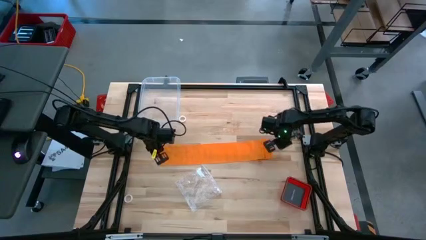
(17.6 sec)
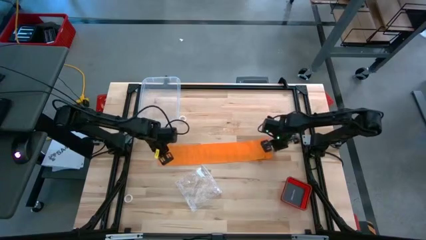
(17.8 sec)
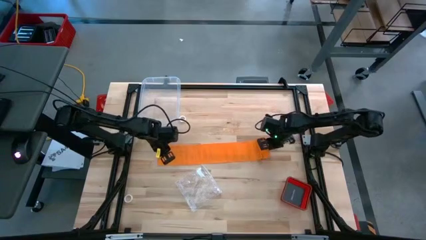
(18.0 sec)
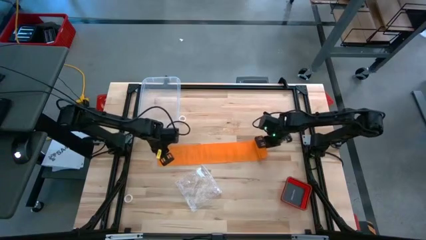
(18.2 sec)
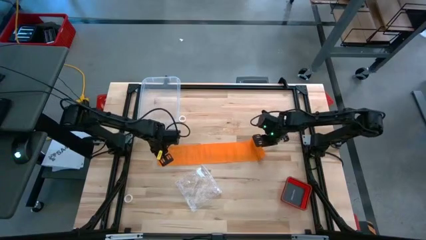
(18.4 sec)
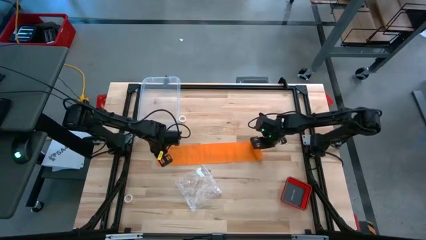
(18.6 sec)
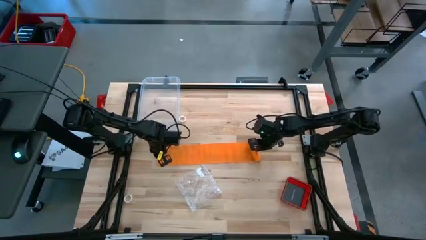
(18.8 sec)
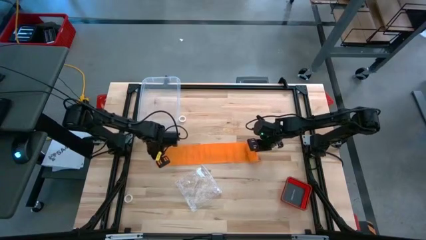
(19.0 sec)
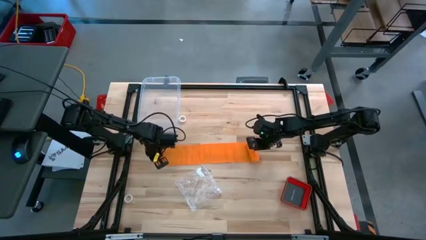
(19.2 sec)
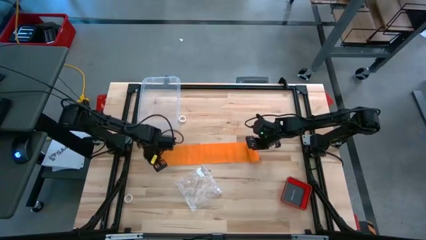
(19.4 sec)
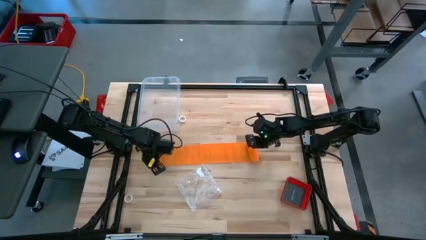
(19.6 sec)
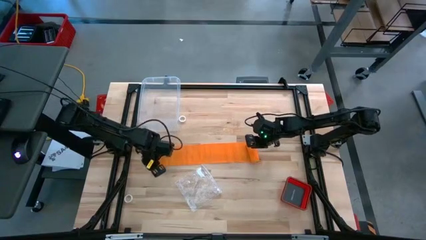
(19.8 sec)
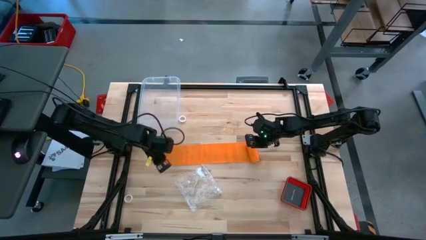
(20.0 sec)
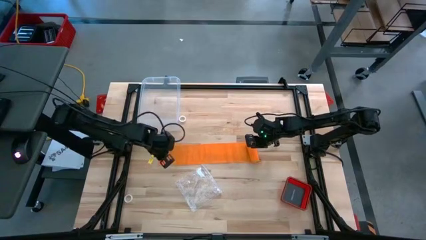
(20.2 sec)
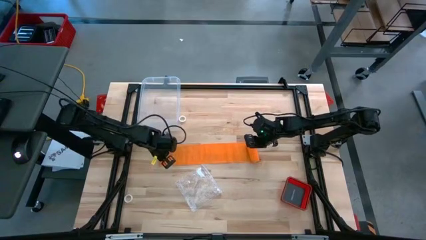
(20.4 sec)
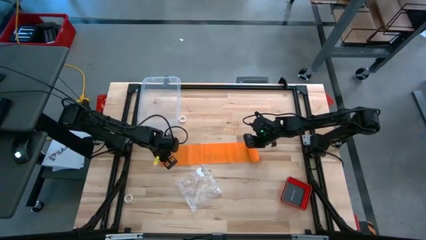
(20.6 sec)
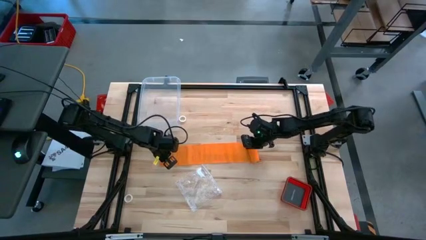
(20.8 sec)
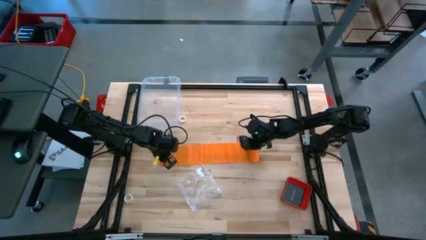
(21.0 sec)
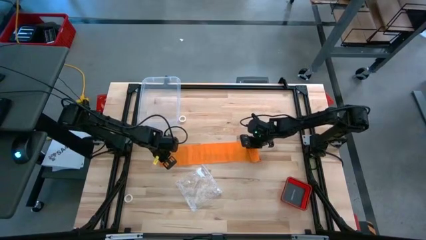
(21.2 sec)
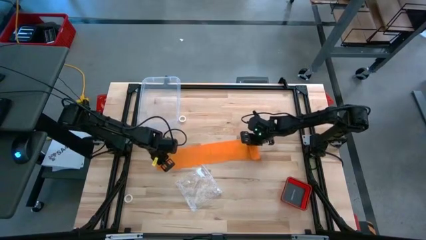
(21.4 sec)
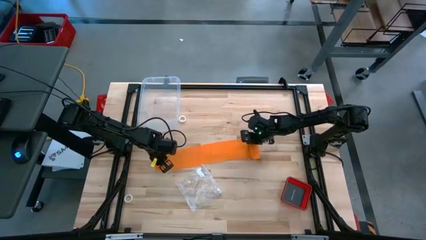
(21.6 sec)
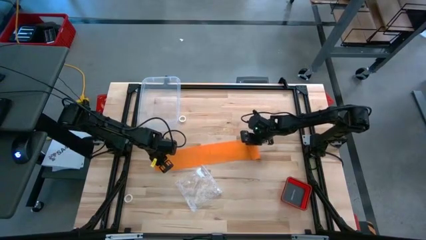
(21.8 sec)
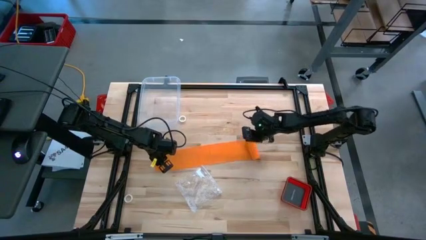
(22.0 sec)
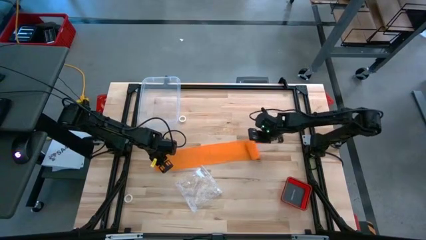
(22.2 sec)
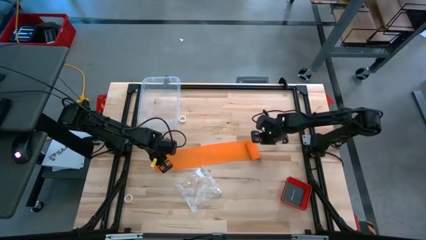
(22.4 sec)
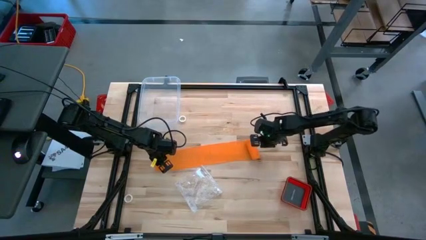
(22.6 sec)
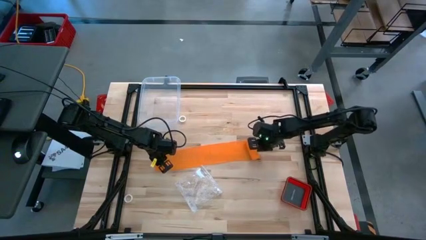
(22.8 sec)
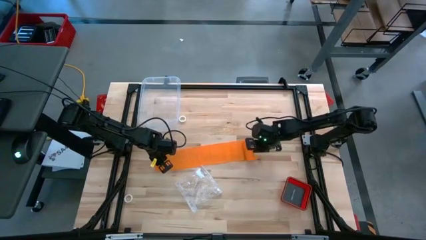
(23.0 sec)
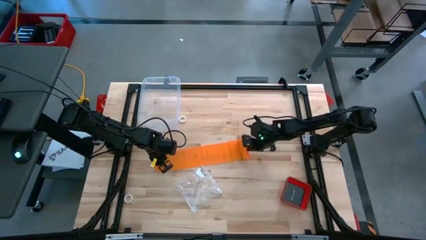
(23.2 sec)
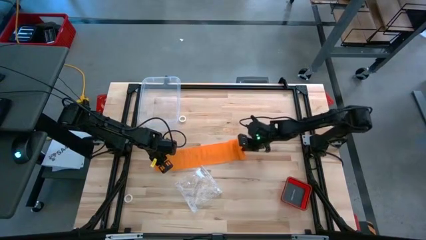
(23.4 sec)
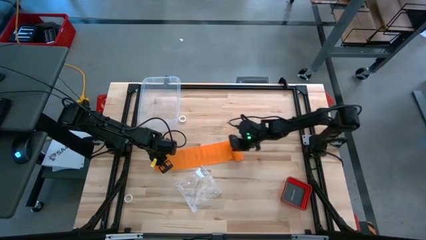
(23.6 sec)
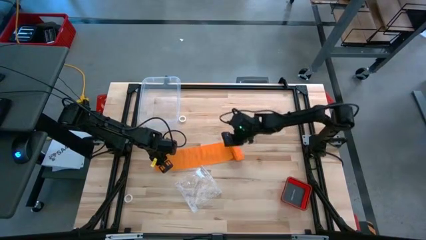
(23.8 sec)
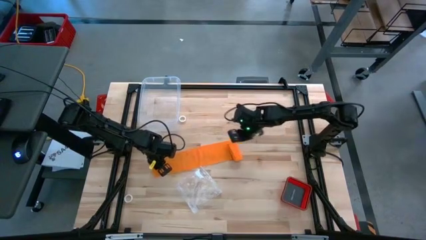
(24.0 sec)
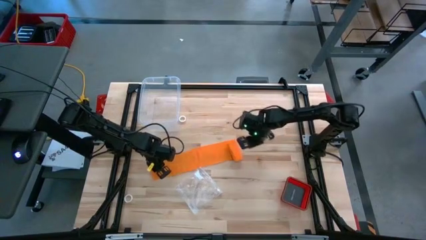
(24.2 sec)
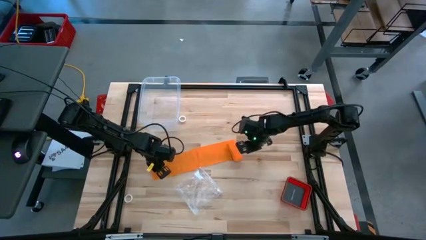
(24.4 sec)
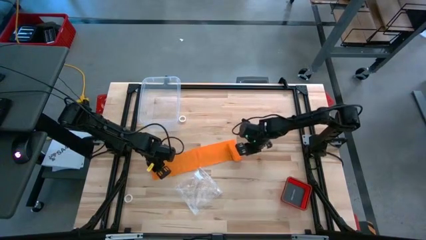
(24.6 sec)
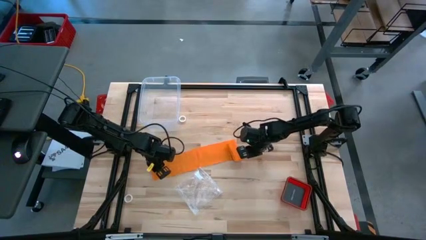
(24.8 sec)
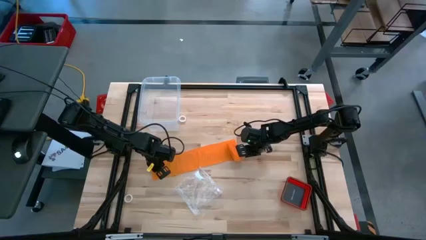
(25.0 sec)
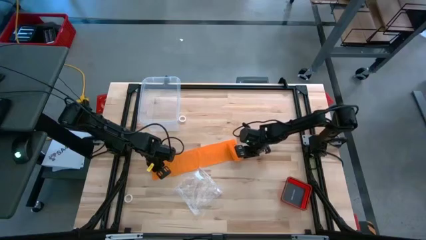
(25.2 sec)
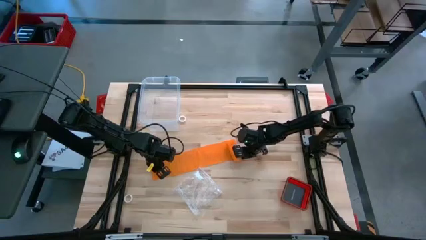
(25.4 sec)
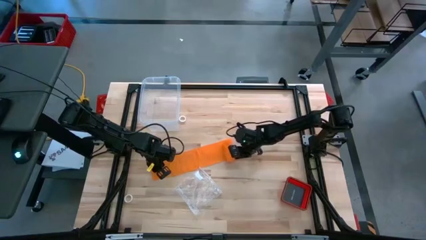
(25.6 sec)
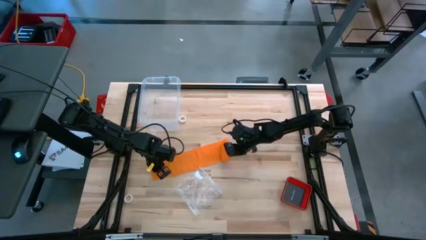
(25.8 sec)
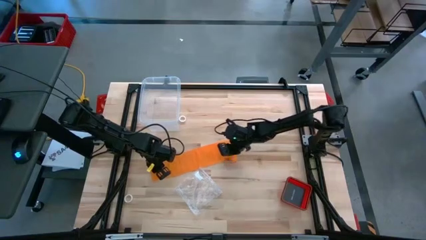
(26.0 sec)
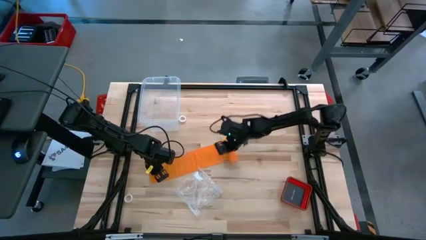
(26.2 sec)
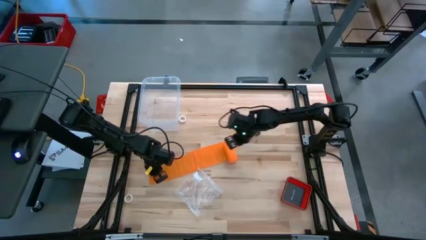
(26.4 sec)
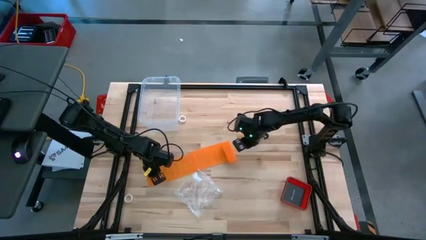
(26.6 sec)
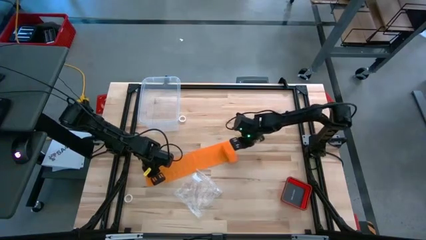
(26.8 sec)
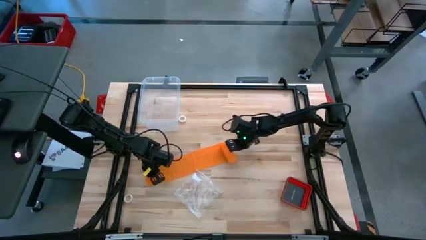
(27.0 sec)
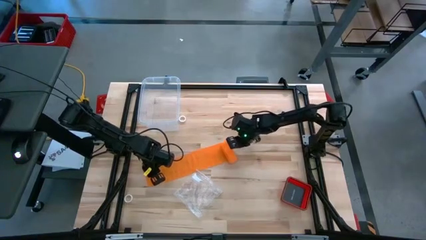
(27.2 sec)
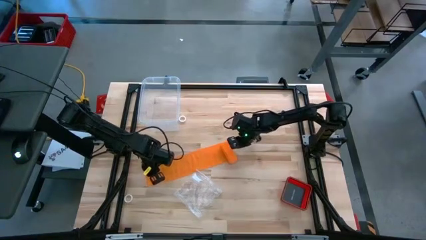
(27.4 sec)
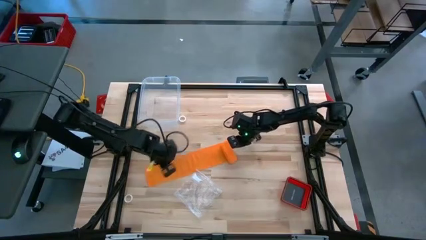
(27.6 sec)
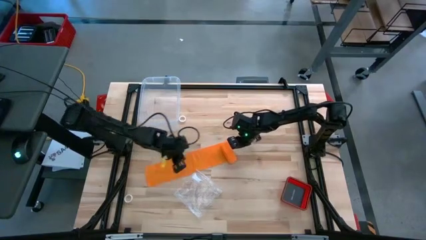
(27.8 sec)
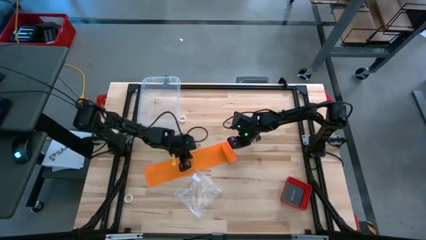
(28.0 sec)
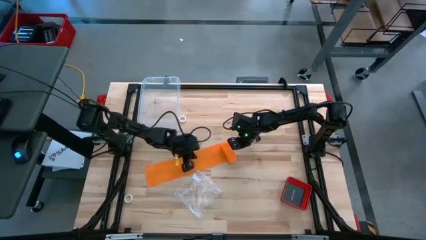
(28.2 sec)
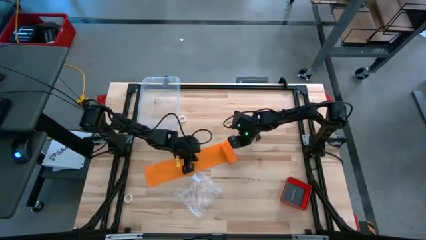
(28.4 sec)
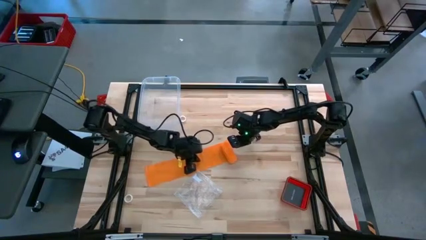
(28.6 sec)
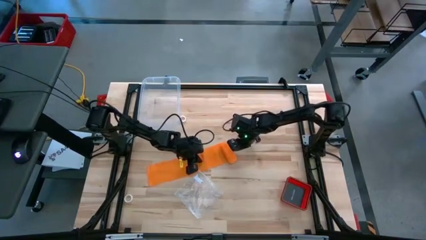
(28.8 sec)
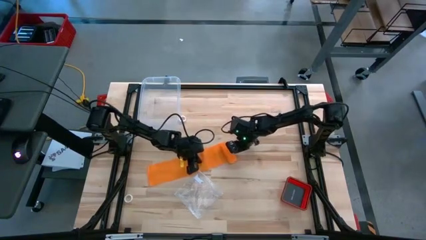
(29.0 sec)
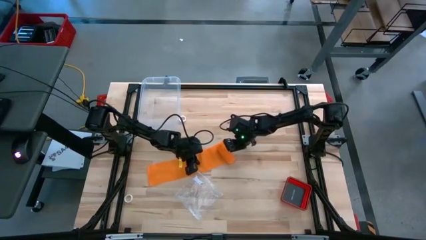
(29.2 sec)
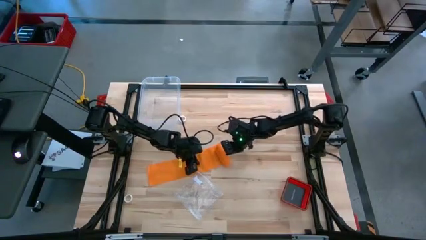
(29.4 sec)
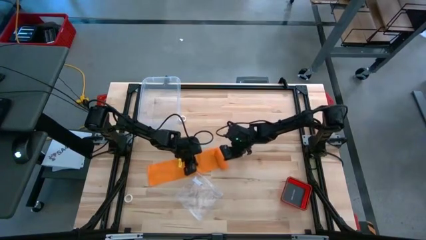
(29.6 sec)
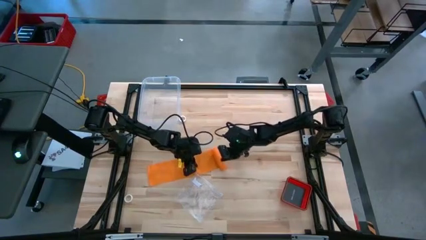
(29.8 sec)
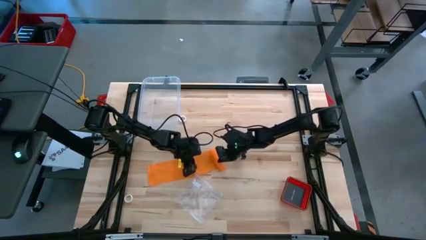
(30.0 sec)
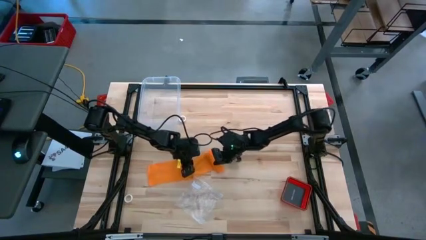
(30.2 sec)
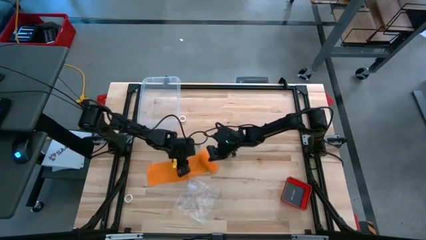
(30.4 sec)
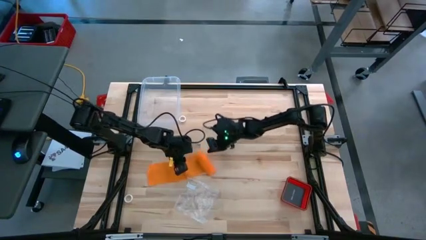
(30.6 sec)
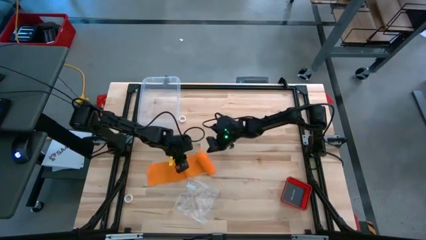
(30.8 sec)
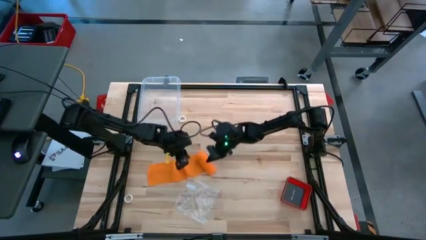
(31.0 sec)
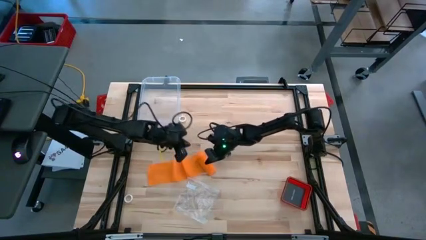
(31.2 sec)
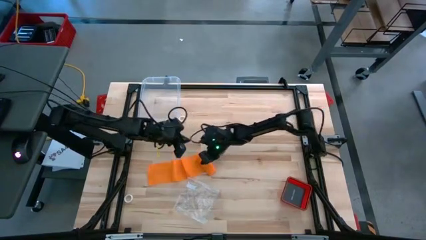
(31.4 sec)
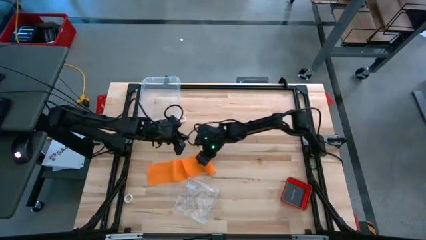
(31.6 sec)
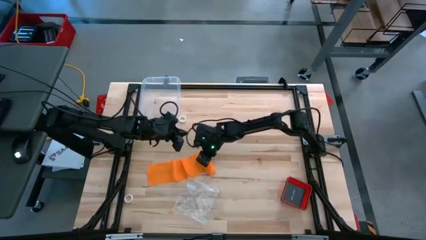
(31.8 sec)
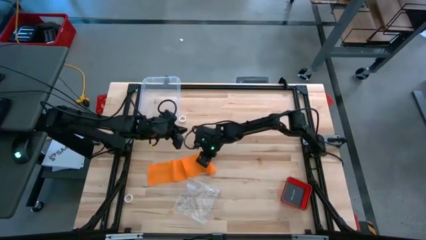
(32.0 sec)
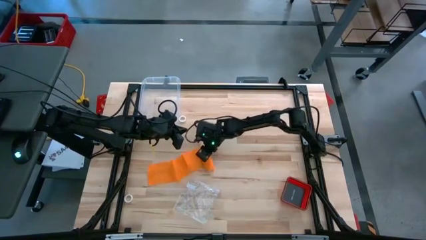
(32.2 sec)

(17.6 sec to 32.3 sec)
Task: Roll bandage
Roll the orange bandage

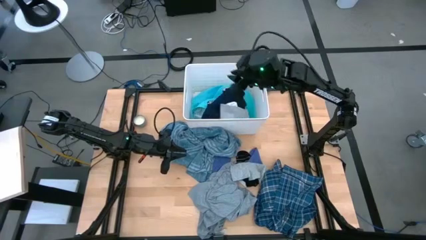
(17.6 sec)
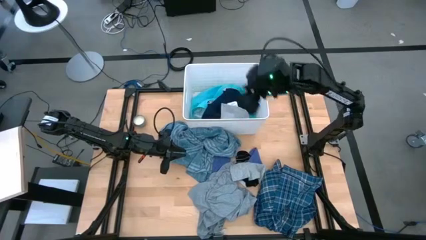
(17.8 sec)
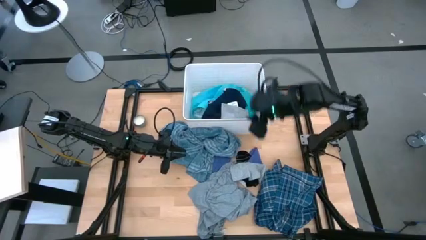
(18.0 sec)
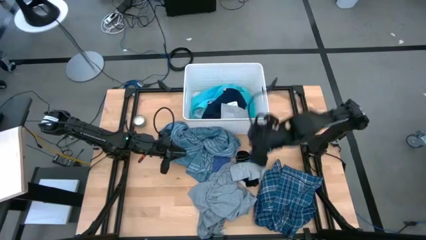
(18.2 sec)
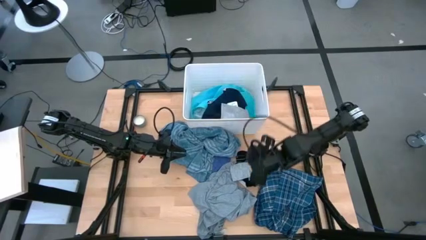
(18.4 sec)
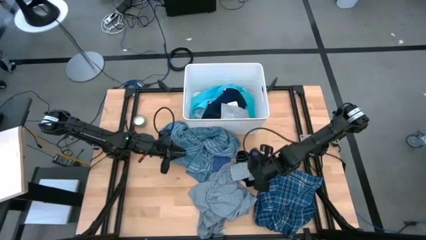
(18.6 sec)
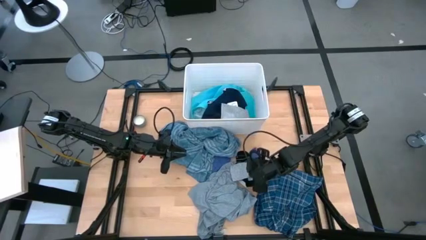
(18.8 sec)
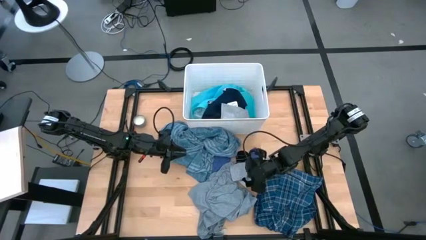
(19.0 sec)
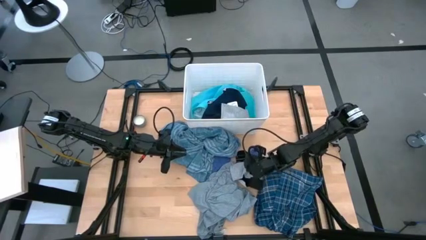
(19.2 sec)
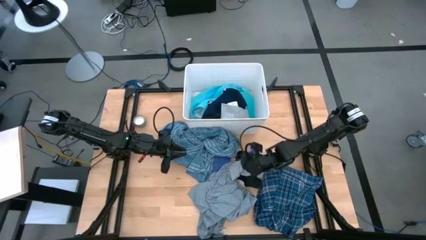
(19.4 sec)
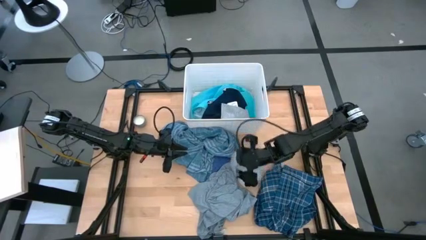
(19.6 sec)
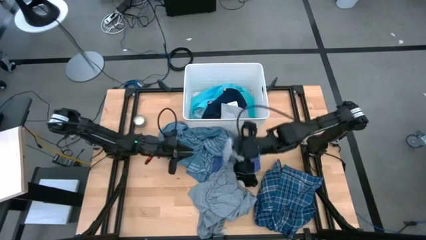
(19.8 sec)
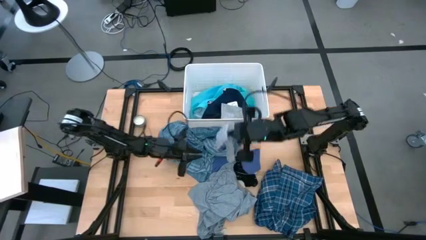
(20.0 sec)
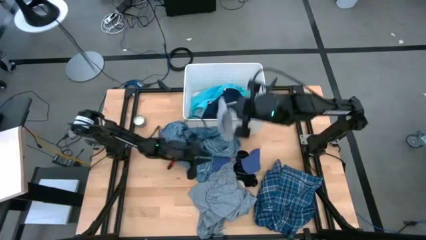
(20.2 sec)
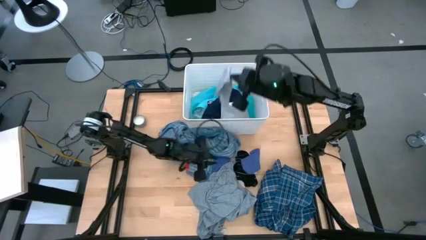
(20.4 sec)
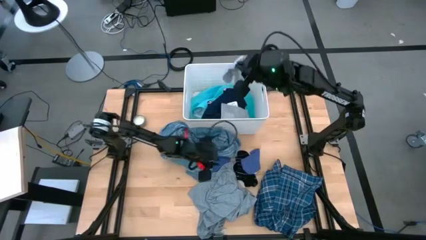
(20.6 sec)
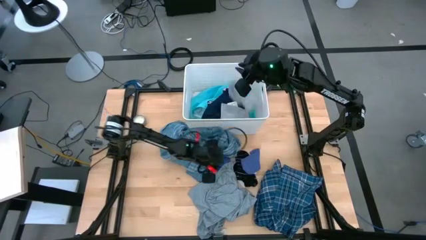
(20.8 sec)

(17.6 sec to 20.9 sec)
Task: Sort clothes
Put the gray sock into the white laundry organizer
